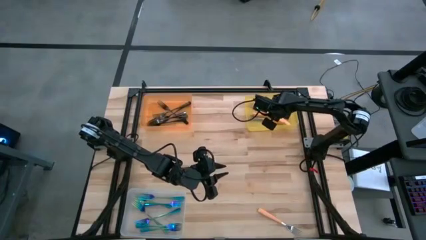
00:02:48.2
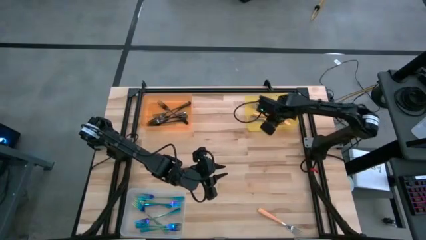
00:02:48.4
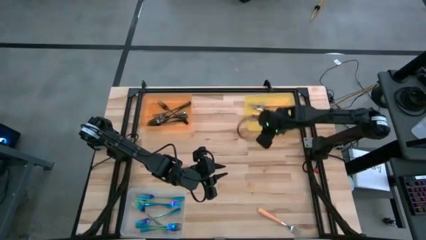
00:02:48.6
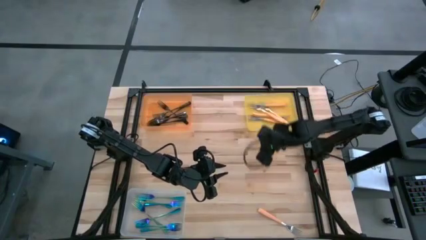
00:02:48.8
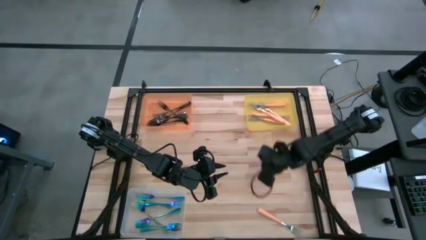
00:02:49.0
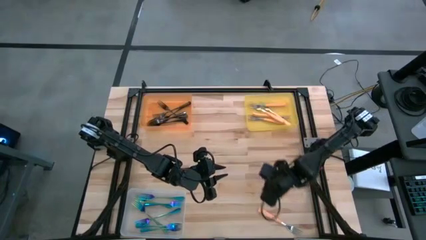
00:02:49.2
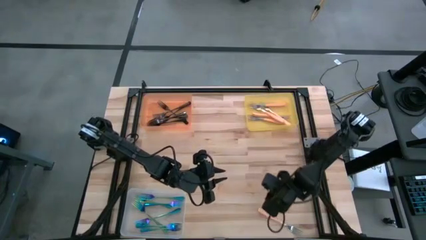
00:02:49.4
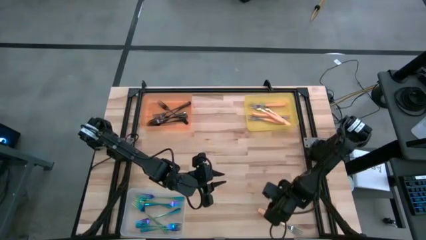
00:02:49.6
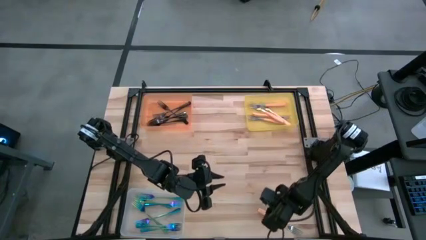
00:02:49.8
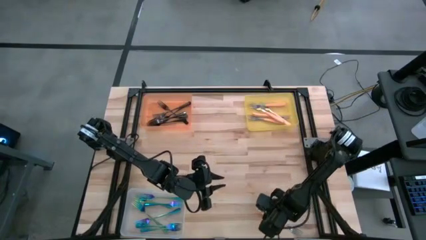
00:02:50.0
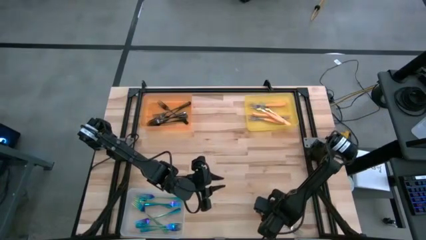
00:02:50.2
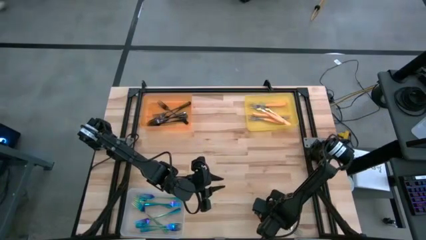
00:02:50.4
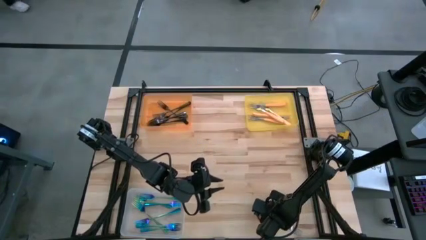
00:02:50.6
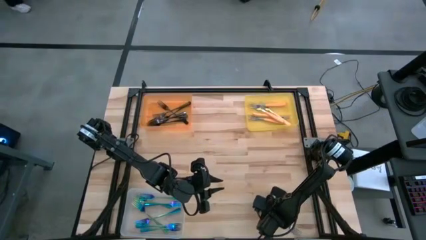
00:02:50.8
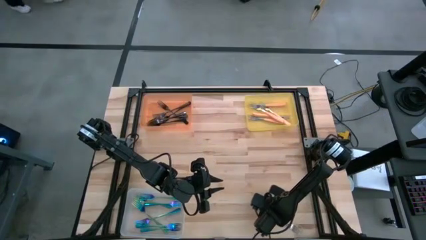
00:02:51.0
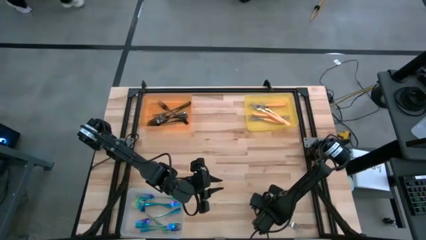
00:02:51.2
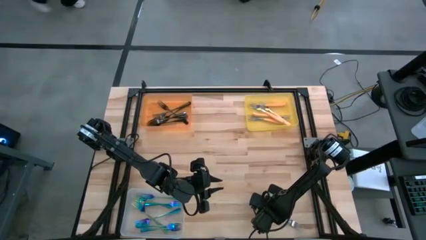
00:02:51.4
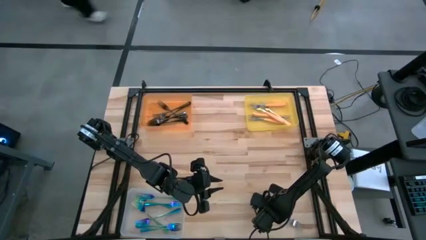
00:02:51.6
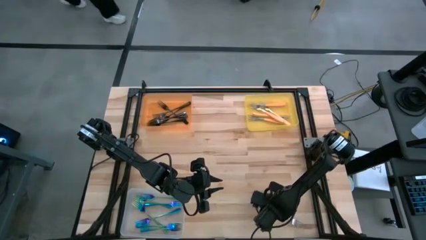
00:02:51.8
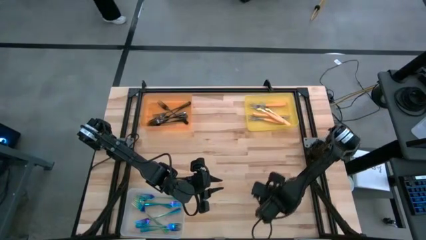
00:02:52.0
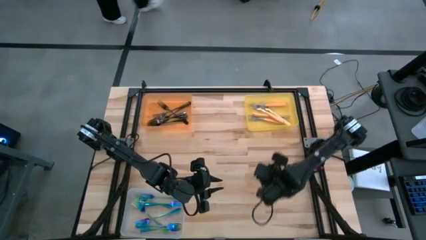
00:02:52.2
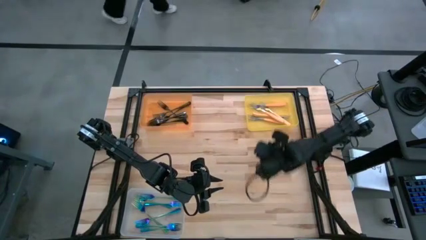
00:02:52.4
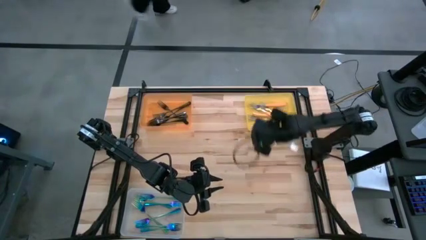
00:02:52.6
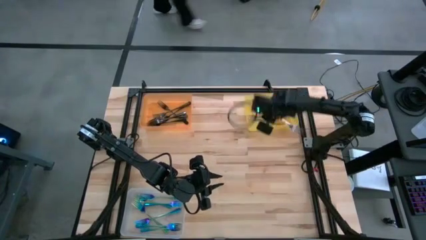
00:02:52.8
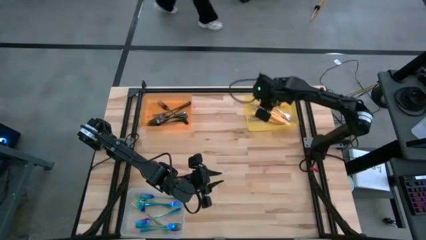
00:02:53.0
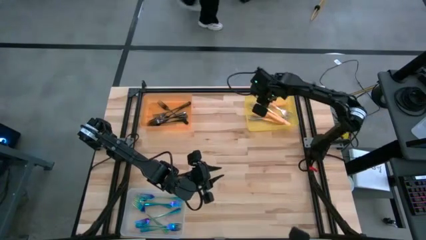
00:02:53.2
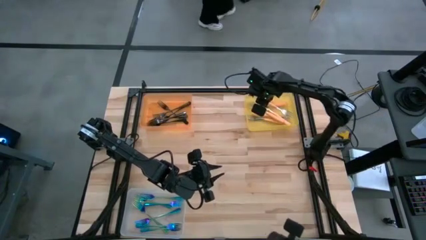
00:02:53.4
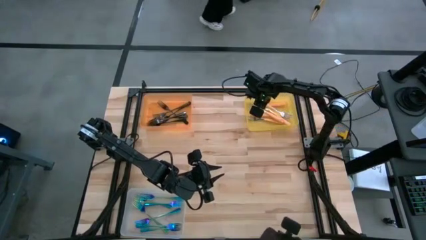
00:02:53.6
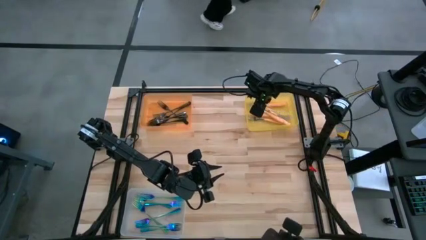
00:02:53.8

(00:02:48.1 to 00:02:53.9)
Task: Sort silverware by color (type)
Put the orange fork into the yellow bin

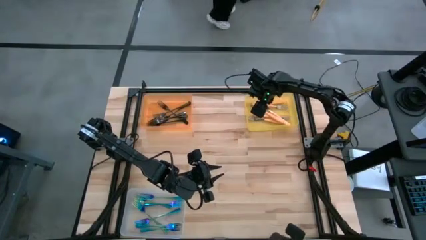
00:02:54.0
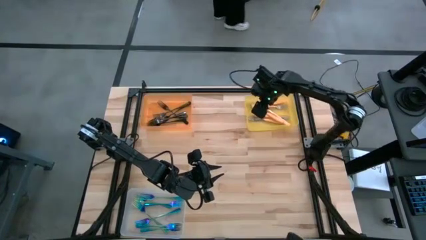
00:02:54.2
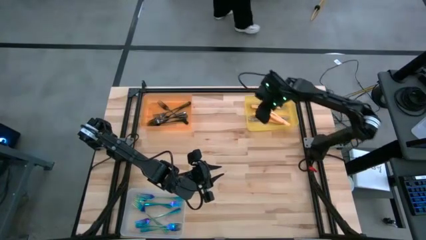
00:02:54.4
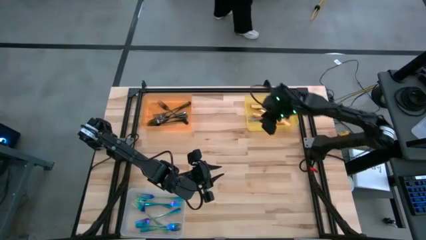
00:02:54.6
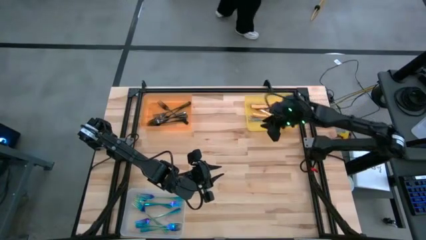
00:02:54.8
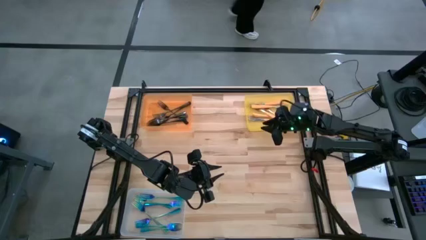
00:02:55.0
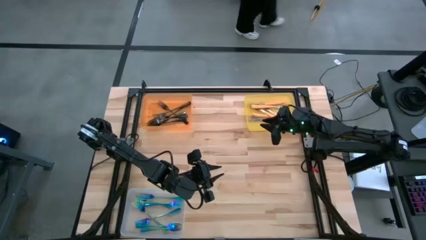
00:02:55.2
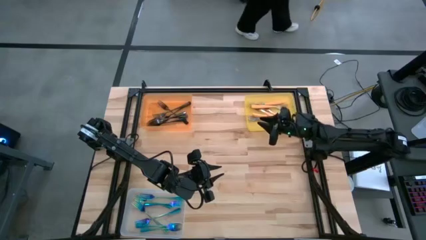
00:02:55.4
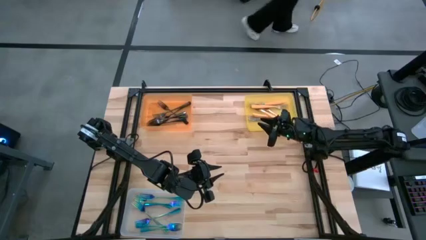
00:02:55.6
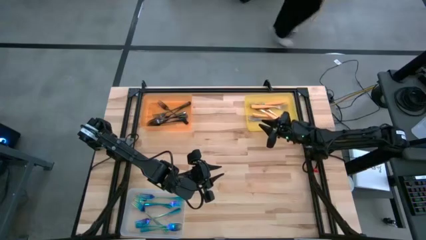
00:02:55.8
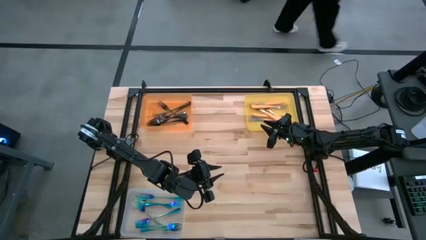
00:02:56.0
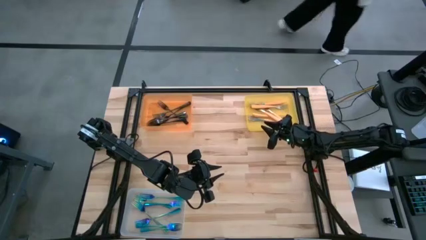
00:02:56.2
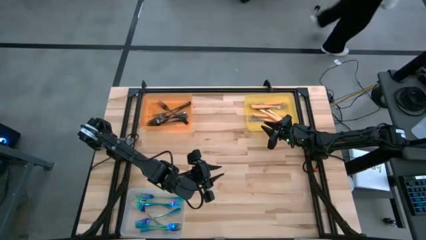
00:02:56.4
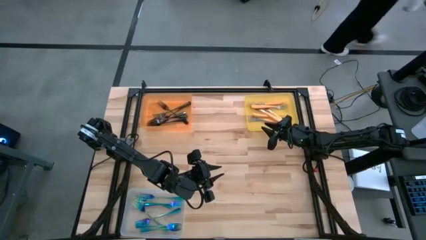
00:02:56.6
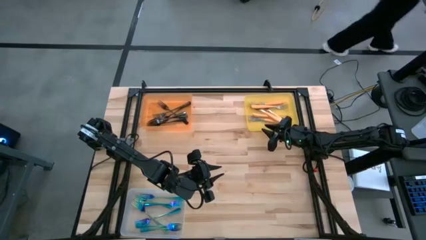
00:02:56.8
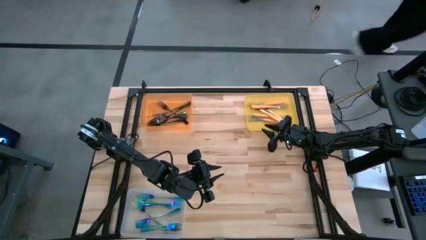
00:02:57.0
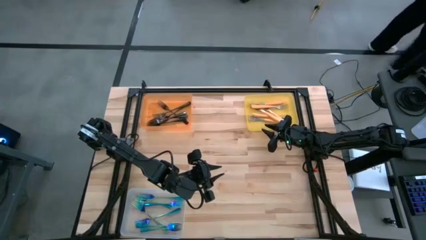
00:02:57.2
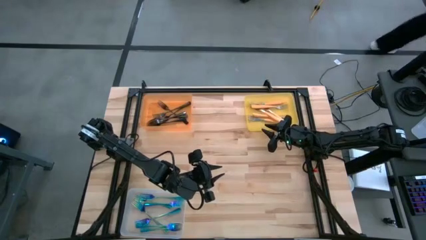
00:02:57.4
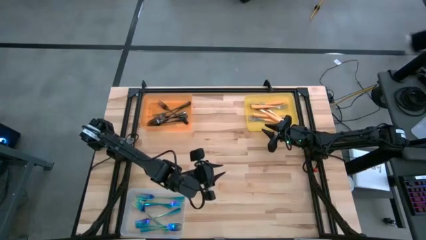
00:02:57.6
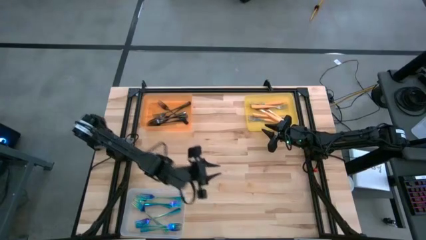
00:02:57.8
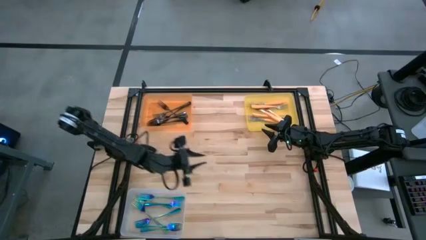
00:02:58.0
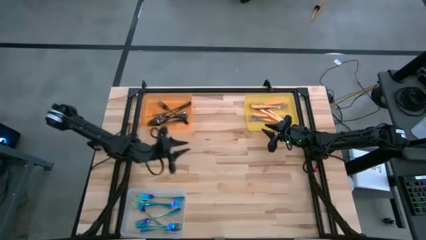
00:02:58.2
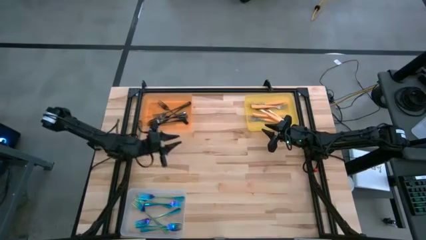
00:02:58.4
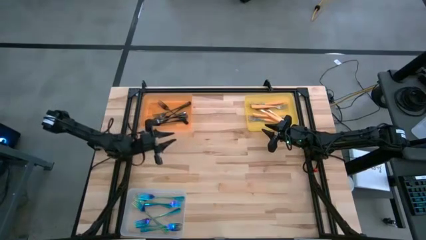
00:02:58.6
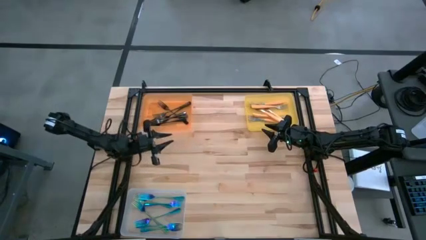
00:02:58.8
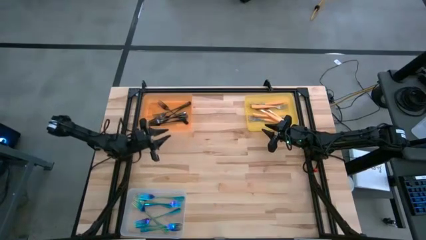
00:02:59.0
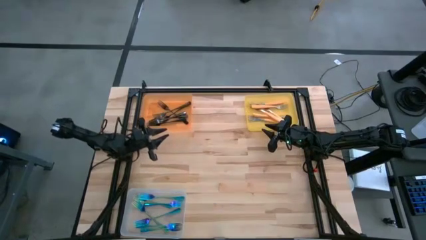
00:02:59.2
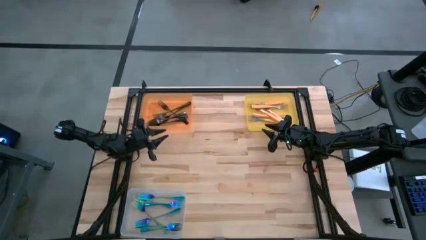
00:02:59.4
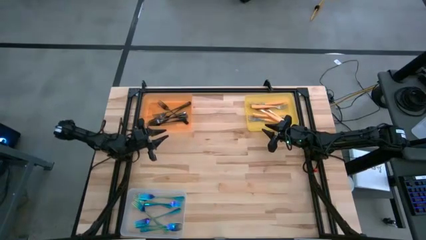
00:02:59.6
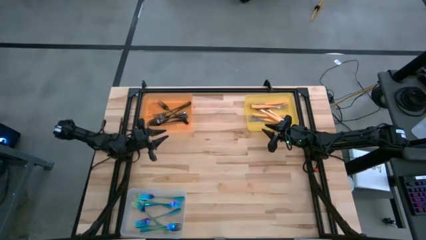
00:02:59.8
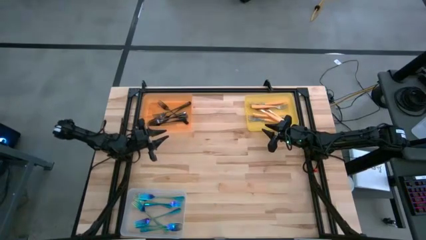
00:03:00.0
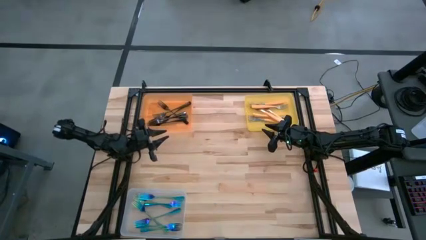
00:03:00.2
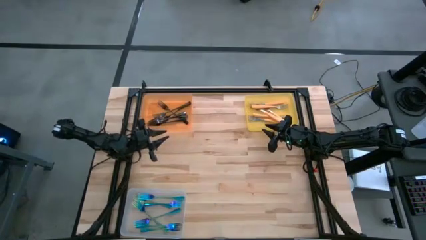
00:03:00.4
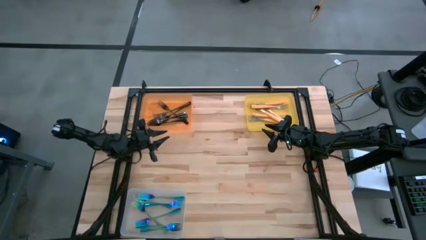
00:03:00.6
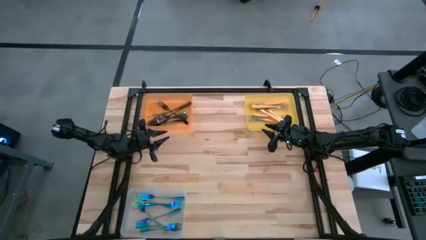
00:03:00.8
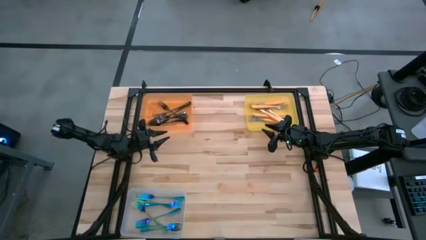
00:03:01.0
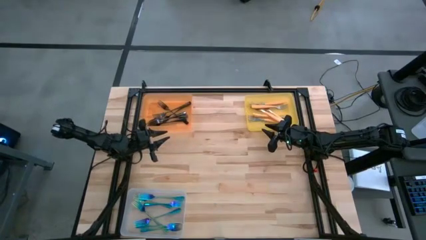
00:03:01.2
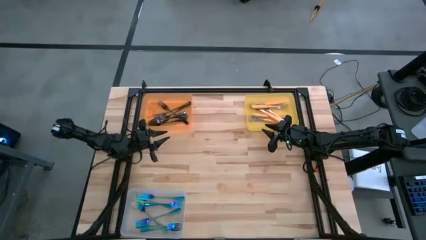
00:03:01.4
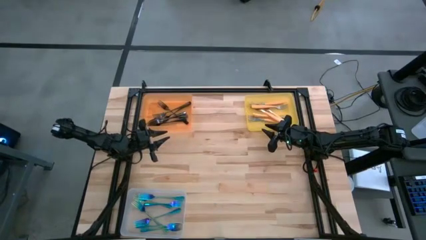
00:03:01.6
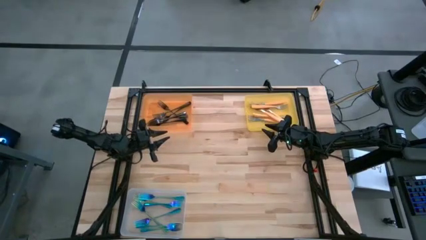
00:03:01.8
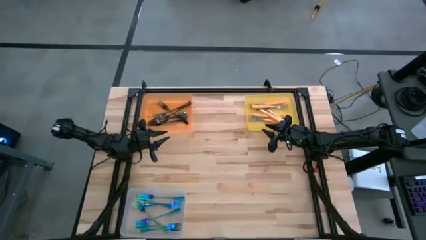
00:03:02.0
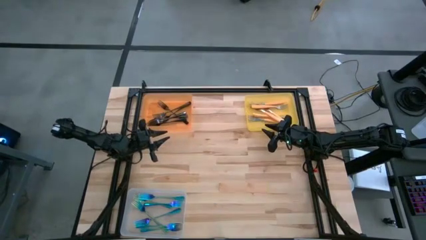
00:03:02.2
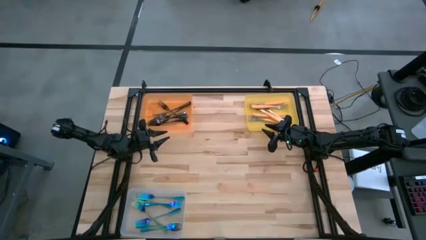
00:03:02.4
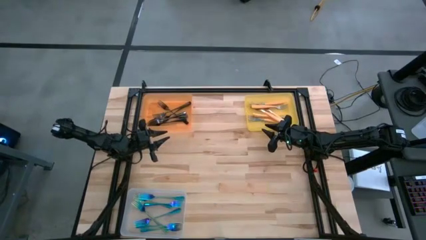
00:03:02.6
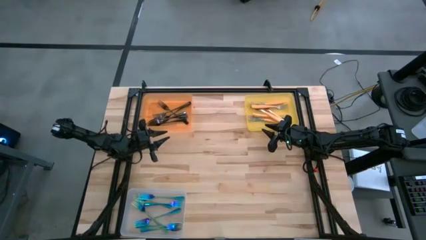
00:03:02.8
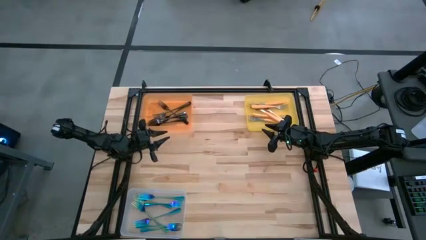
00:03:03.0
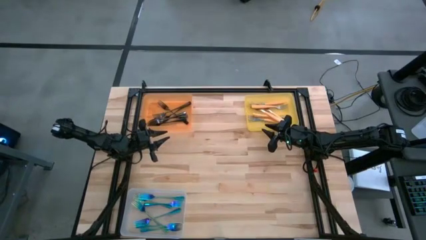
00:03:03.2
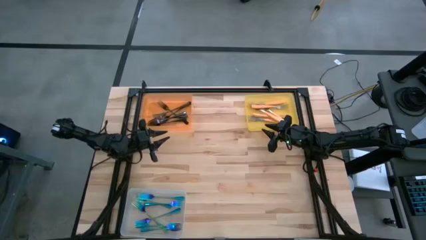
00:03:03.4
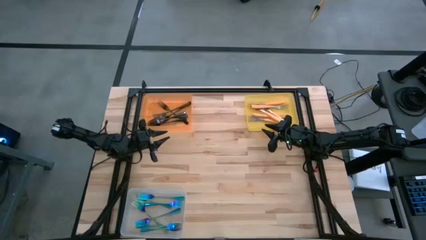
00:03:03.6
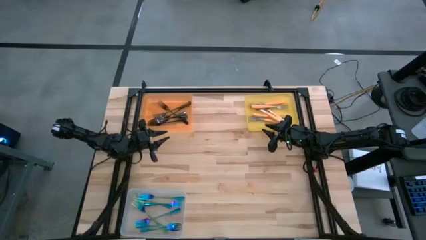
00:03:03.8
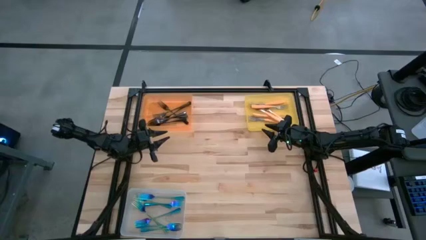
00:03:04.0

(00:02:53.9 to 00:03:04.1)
Return to Home Position

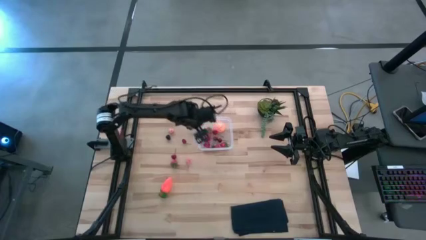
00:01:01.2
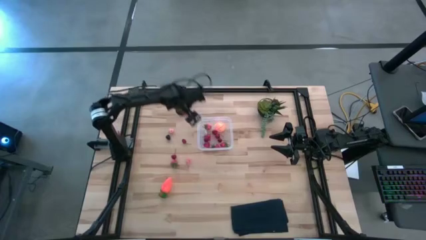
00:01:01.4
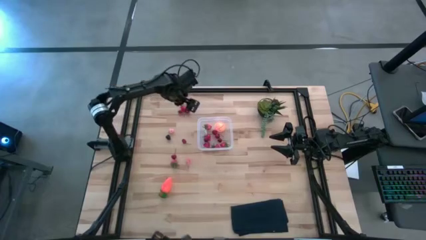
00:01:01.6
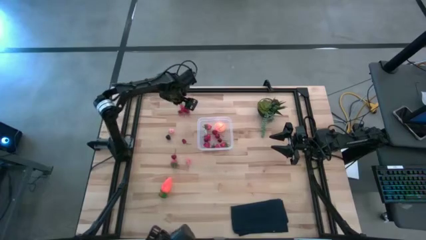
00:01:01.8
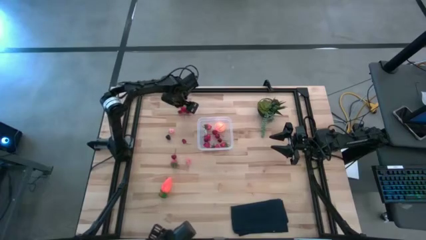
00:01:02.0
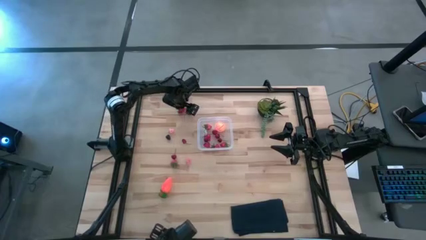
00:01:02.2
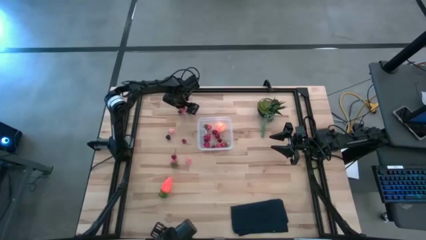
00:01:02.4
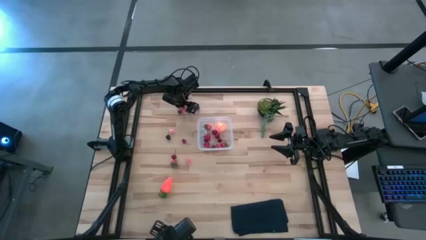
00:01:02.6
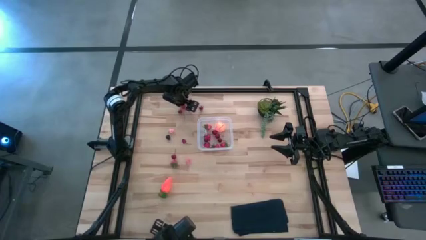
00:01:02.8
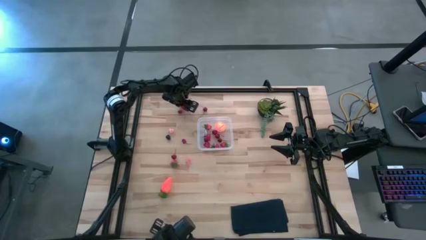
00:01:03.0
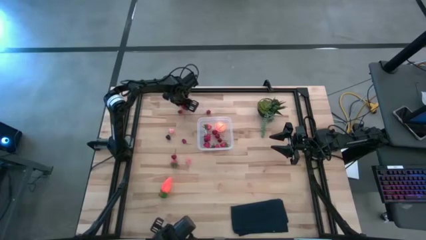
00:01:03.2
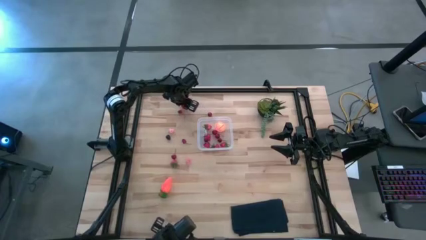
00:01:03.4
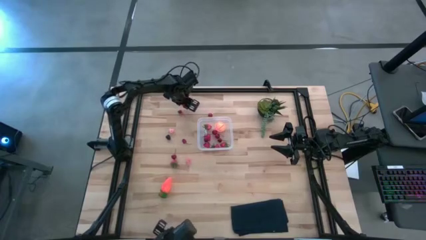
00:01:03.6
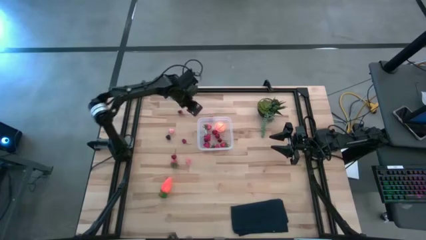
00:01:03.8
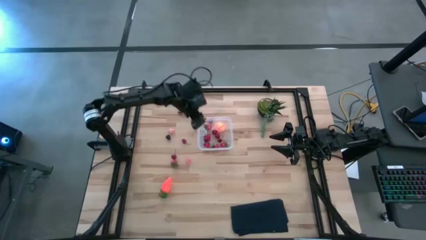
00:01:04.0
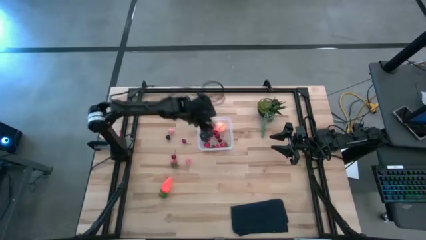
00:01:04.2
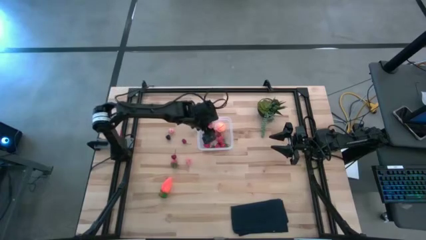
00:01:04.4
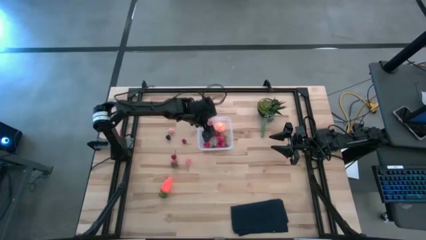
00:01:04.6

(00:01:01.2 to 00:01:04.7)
Task: Pick and placing Produce into tupperware
Put the strawberry into the transparent bin
